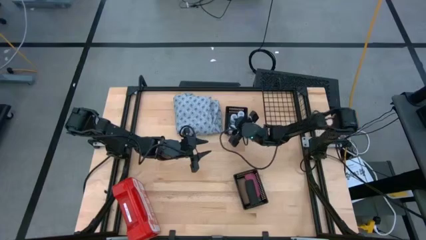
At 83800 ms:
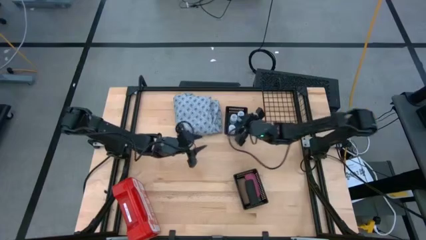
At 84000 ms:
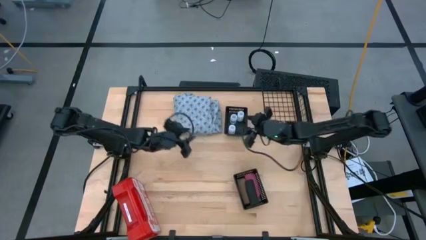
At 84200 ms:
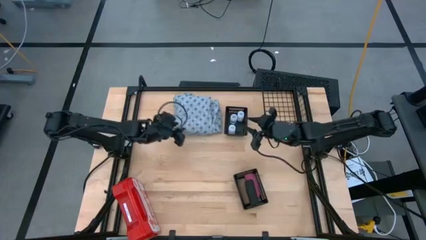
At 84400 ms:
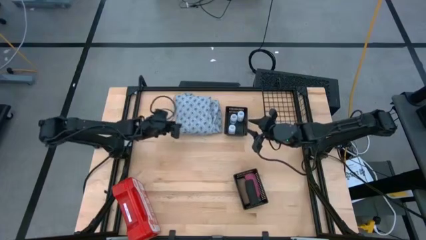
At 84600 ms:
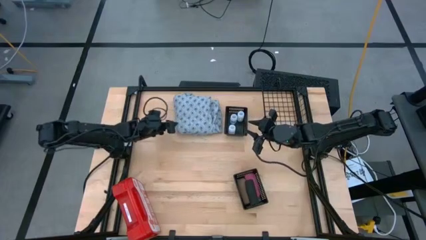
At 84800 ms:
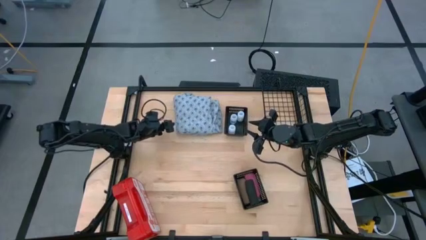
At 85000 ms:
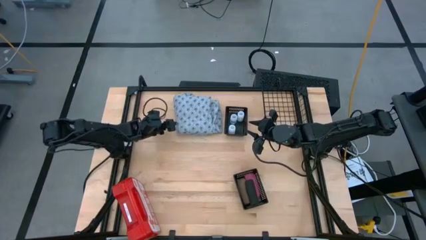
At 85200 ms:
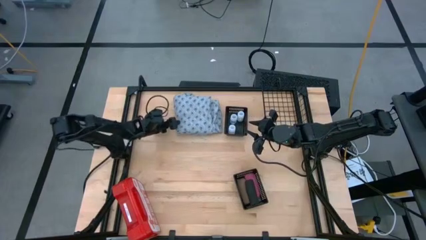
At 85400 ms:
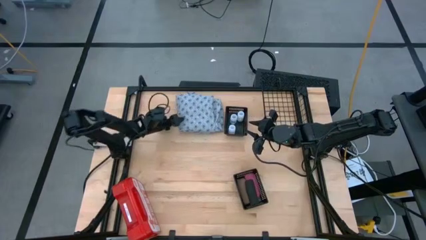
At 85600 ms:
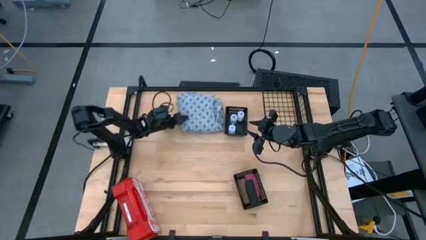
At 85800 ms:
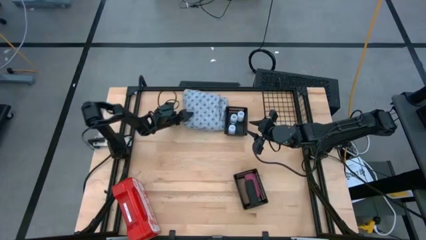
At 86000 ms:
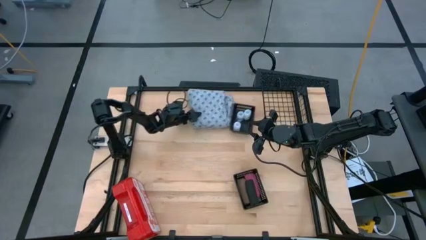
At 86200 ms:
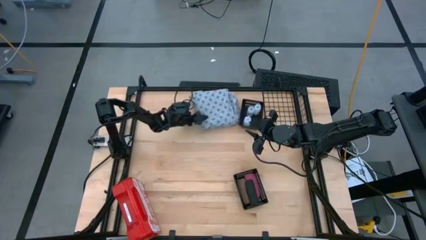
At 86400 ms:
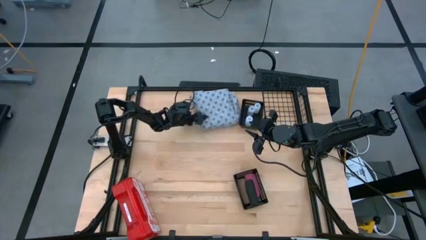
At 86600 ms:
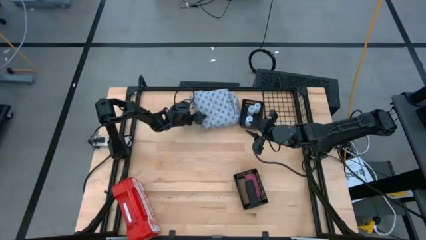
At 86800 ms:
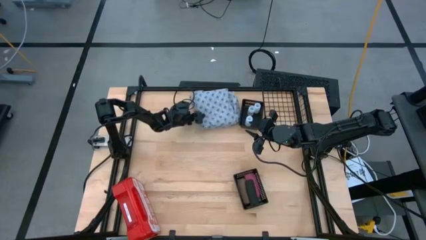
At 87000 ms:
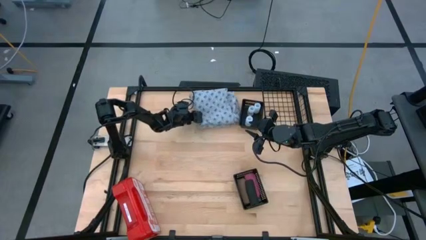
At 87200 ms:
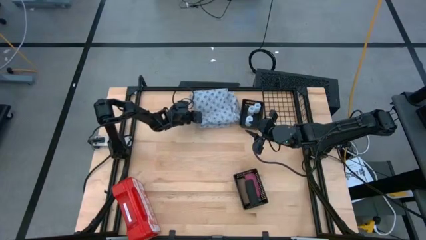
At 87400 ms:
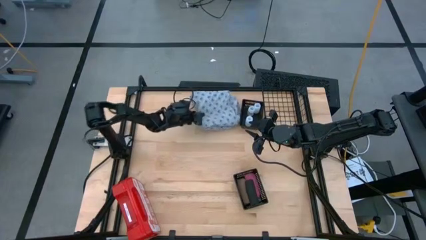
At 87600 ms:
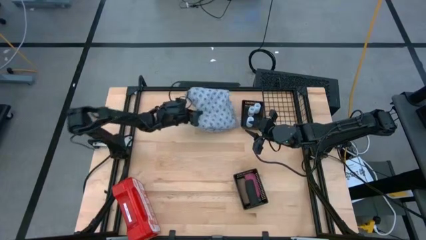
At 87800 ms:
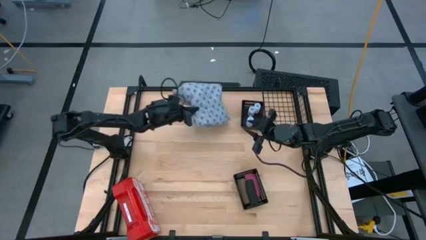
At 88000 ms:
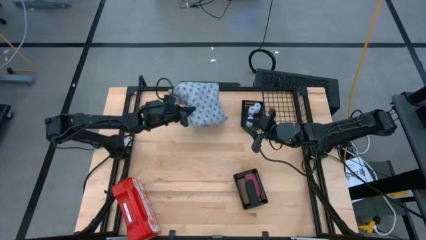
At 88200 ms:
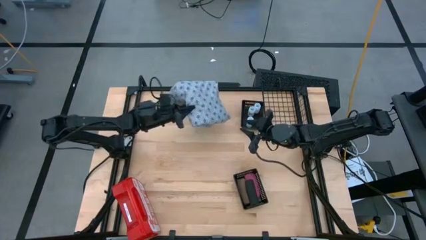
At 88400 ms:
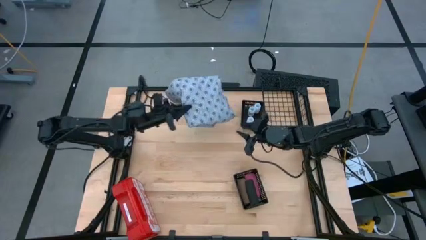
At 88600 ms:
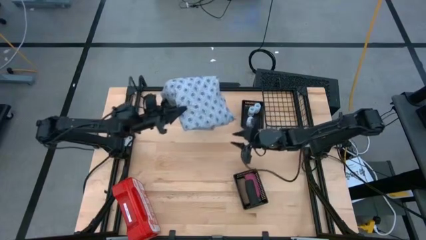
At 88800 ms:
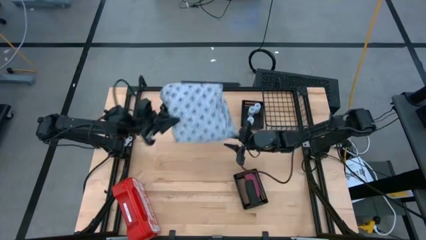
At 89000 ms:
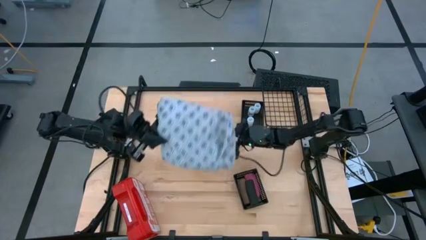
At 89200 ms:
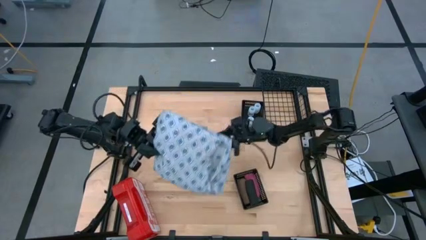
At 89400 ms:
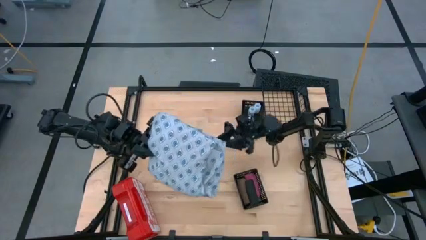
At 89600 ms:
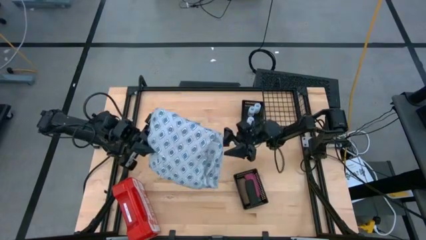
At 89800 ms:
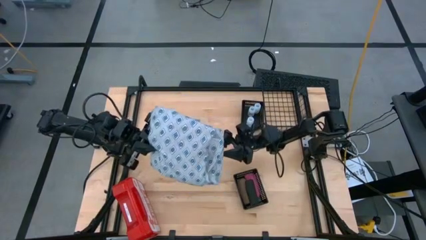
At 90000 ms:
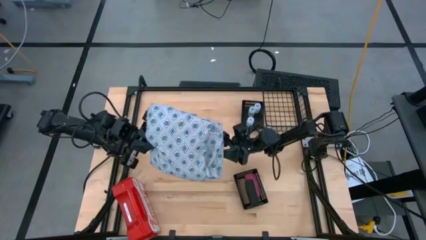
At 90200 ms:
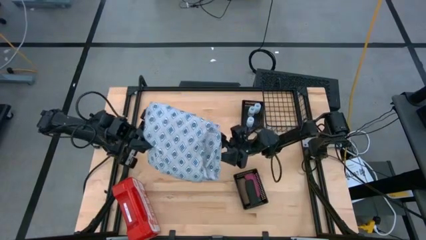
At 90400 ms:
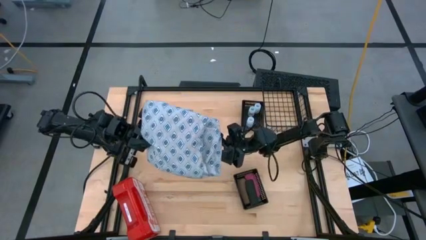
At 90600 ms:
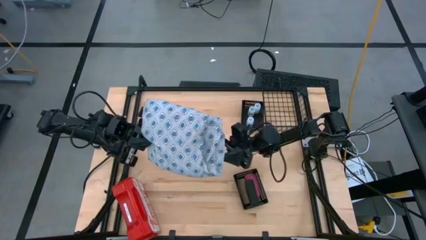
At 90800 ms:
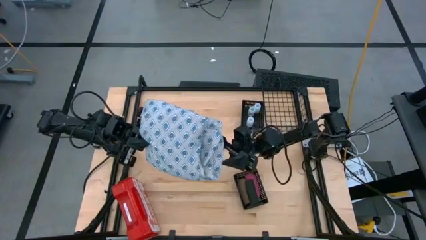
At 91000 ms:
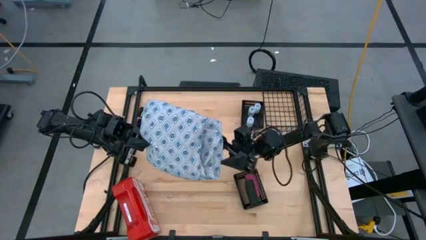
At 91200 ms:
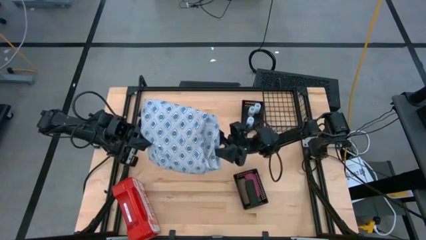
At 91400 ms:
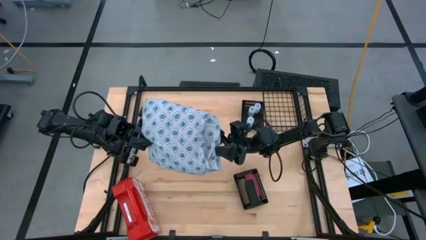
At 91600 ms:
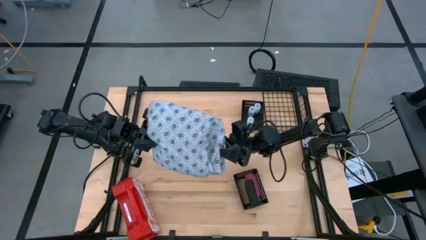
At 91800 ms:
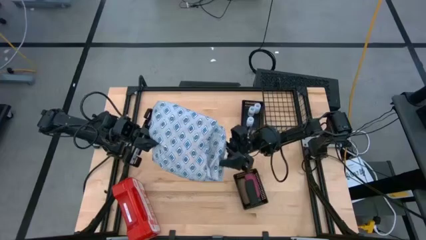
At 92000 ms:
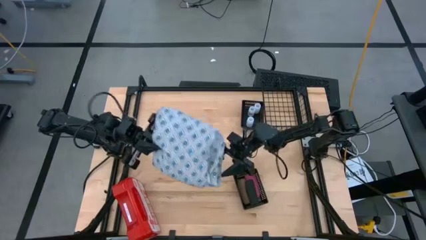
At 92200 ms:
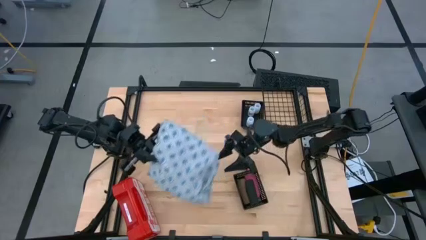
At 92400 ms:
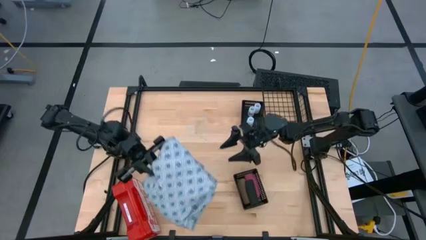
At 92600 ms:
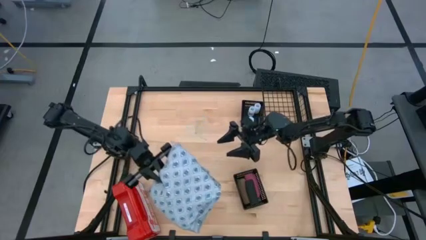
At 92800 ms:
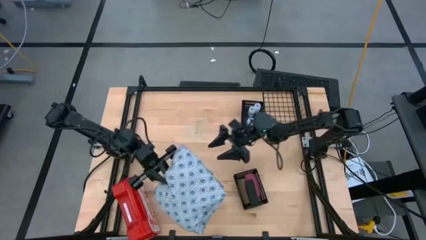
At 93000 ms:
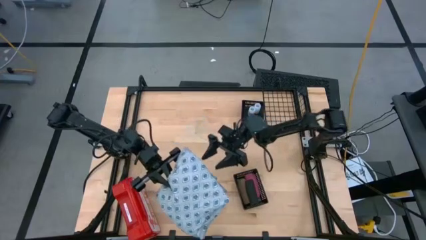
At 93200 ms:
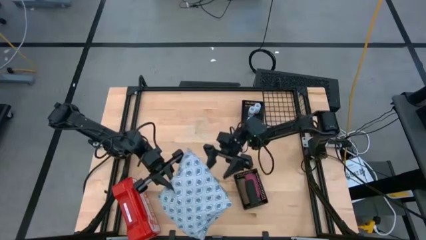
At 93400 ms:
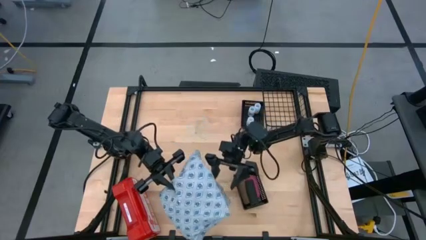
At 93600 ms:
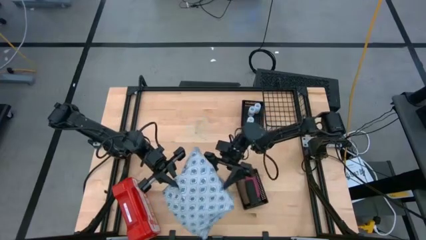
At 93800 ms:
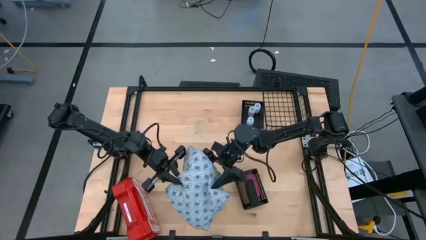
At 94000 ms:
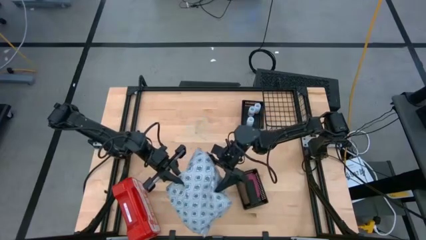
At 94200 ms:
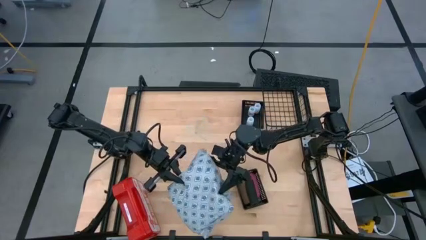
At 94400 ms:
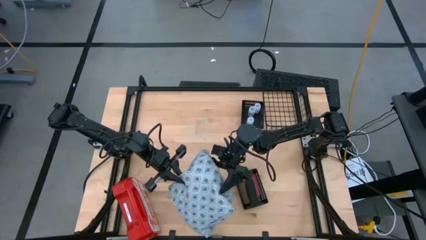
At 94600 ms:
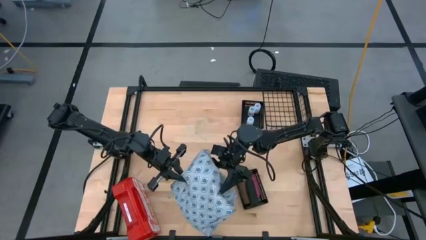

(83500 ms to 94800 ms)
Task: Pick & Place Medicine items
Put the gray patient gown into the black wire basket
